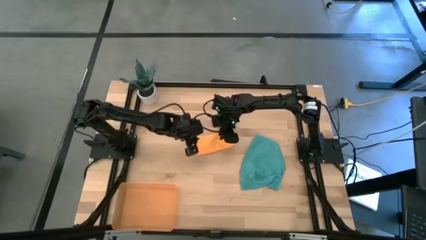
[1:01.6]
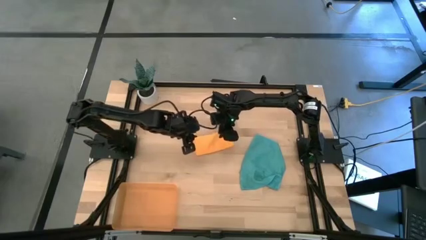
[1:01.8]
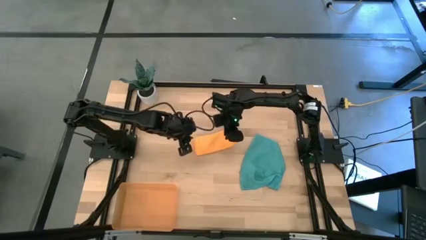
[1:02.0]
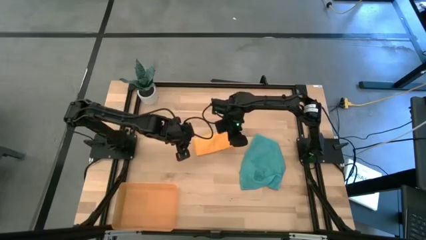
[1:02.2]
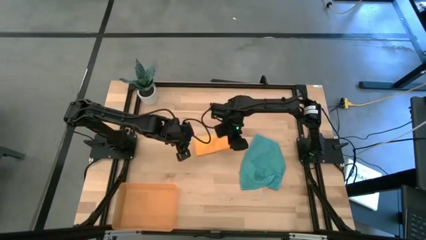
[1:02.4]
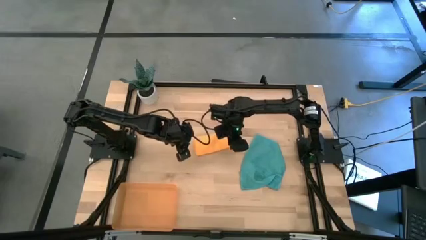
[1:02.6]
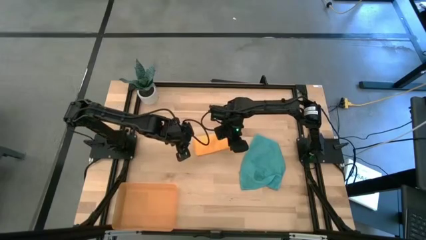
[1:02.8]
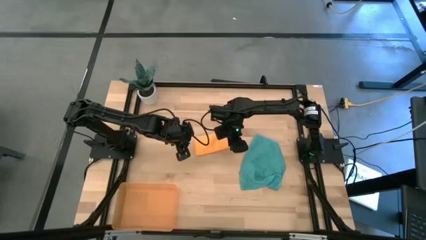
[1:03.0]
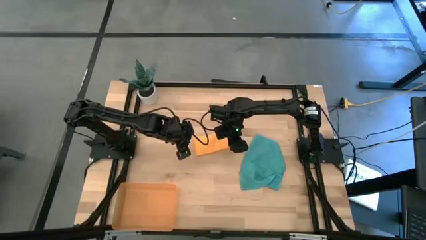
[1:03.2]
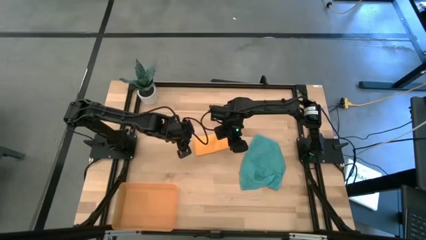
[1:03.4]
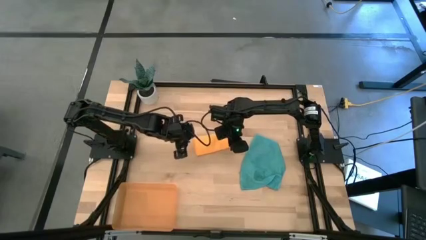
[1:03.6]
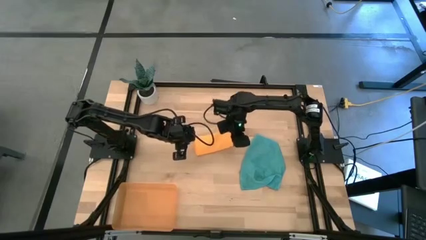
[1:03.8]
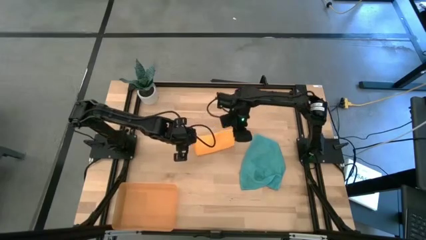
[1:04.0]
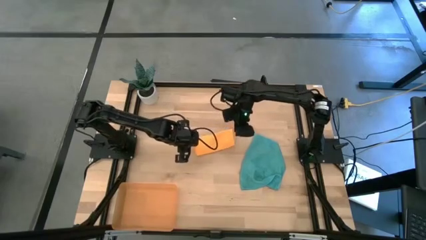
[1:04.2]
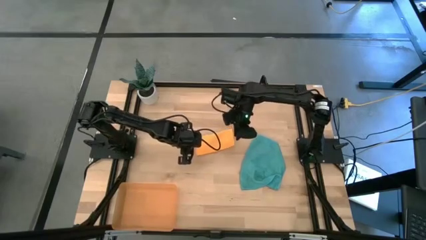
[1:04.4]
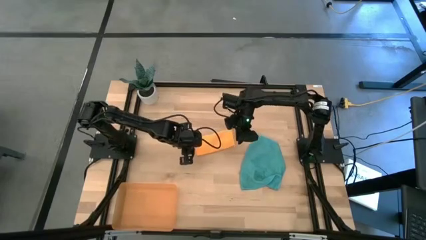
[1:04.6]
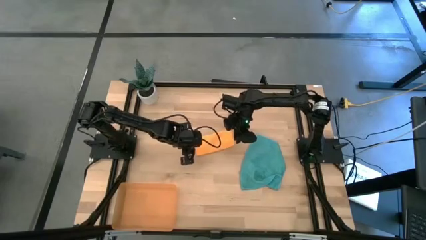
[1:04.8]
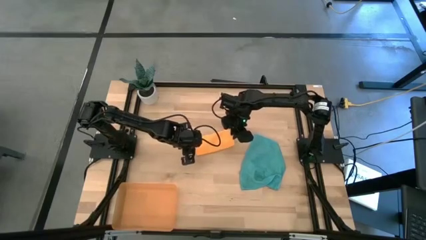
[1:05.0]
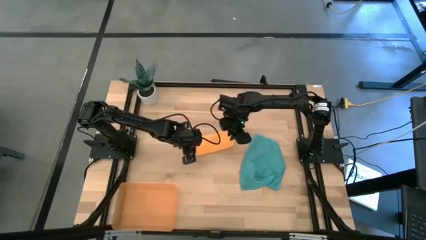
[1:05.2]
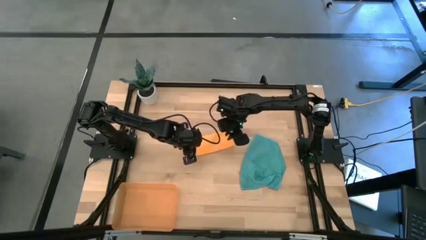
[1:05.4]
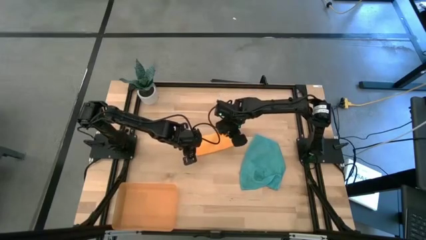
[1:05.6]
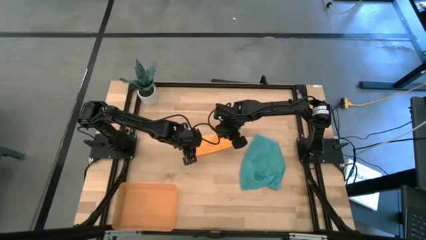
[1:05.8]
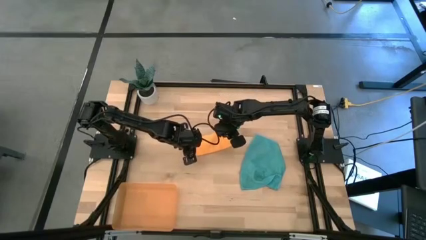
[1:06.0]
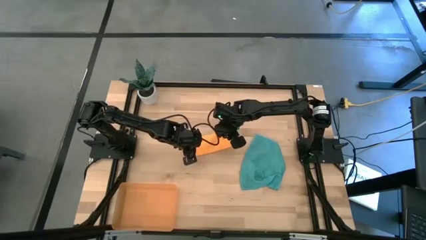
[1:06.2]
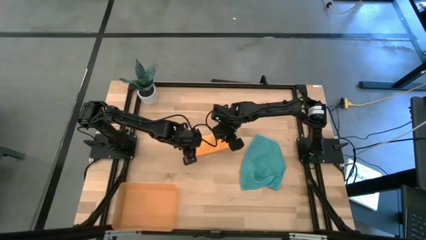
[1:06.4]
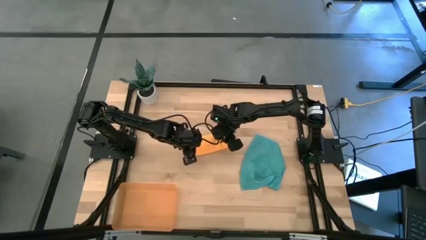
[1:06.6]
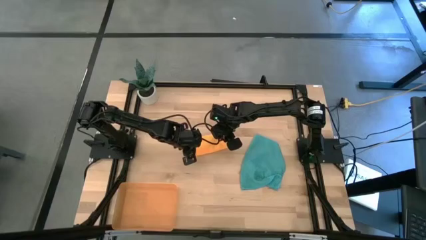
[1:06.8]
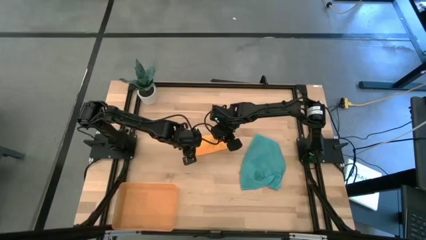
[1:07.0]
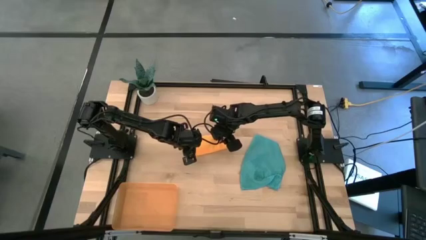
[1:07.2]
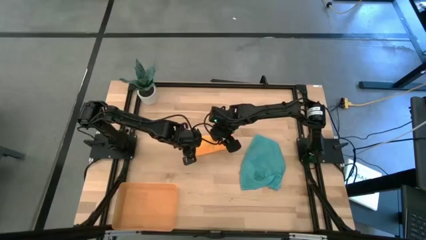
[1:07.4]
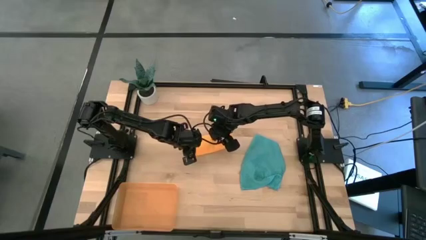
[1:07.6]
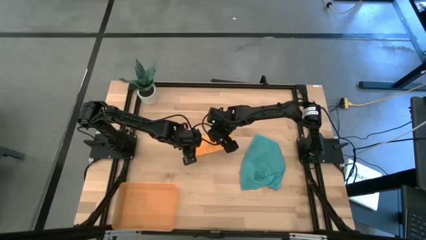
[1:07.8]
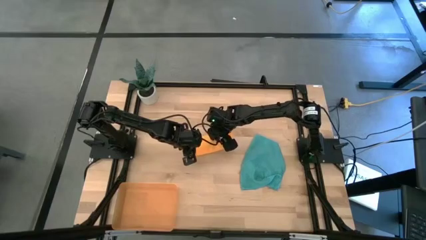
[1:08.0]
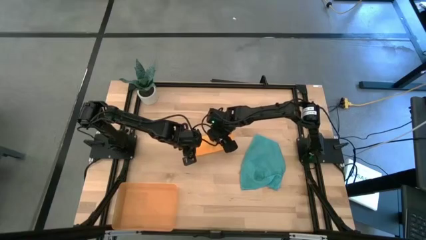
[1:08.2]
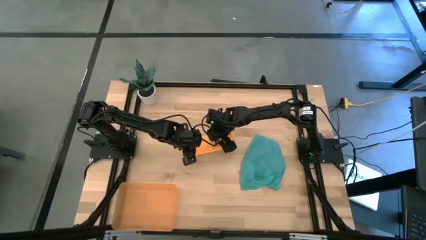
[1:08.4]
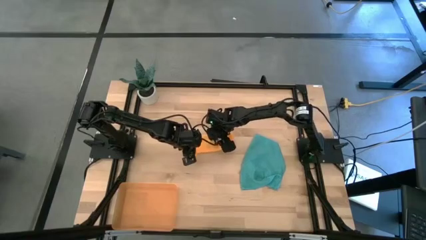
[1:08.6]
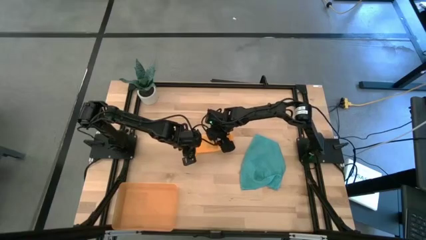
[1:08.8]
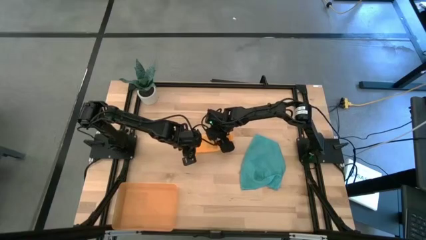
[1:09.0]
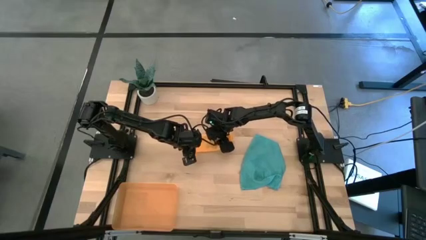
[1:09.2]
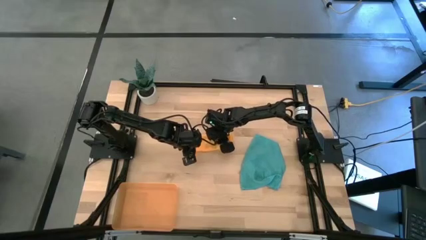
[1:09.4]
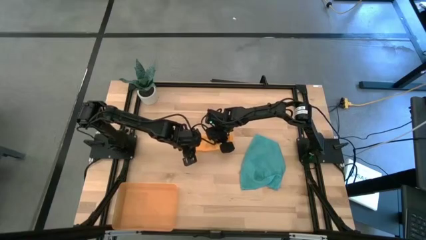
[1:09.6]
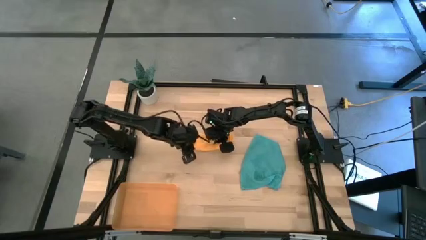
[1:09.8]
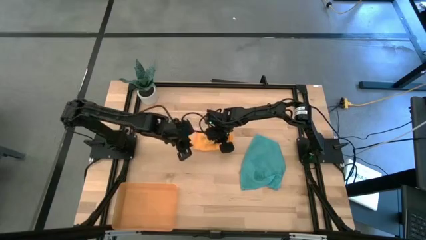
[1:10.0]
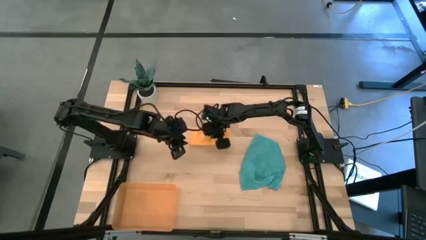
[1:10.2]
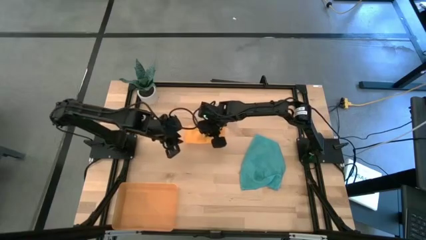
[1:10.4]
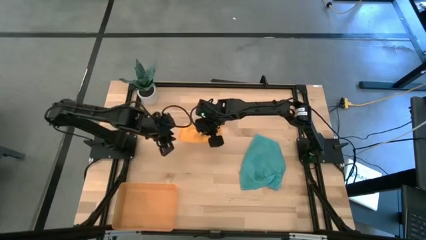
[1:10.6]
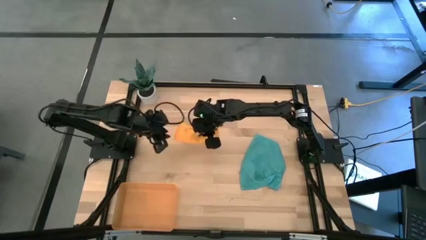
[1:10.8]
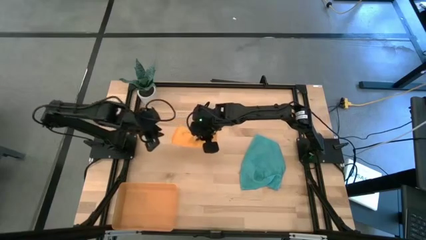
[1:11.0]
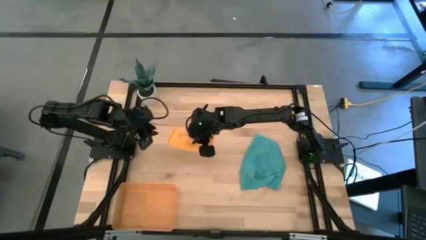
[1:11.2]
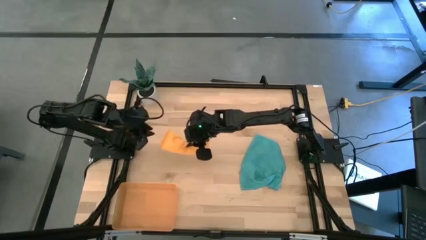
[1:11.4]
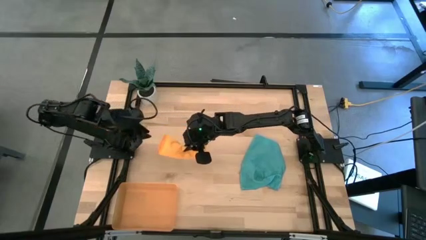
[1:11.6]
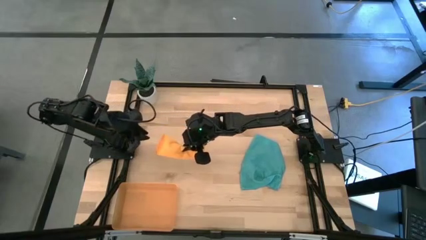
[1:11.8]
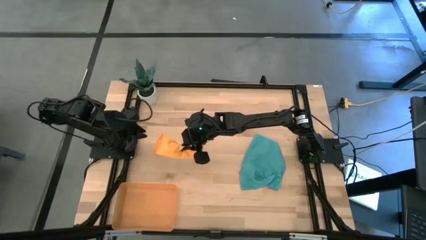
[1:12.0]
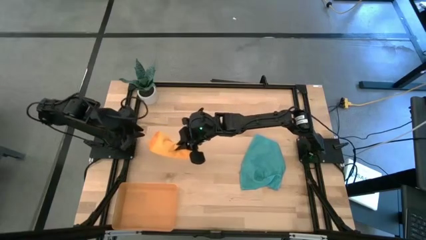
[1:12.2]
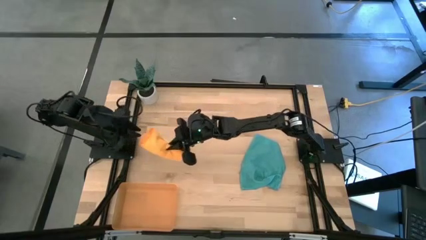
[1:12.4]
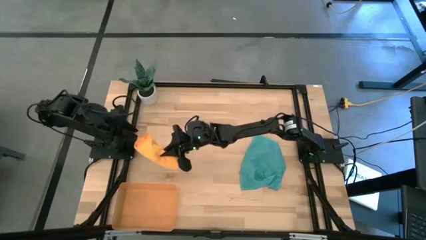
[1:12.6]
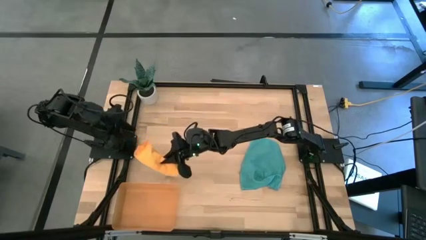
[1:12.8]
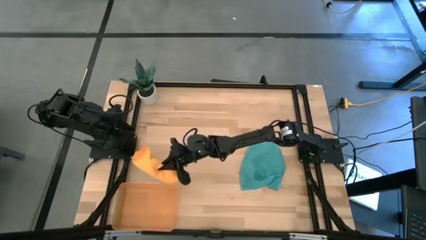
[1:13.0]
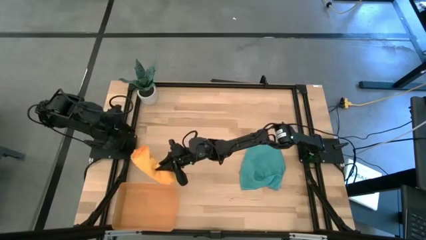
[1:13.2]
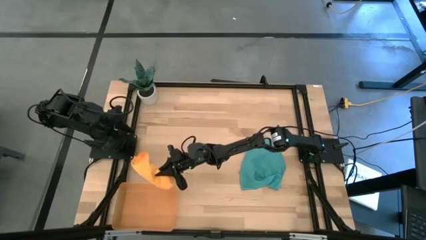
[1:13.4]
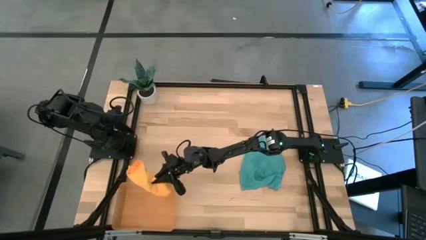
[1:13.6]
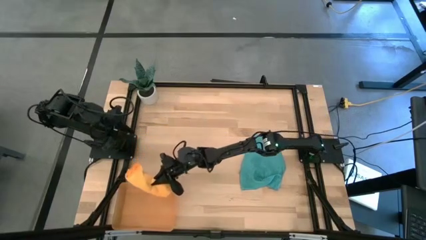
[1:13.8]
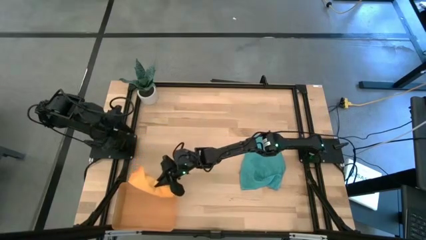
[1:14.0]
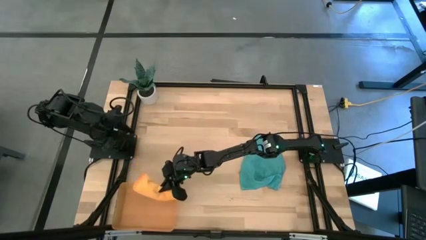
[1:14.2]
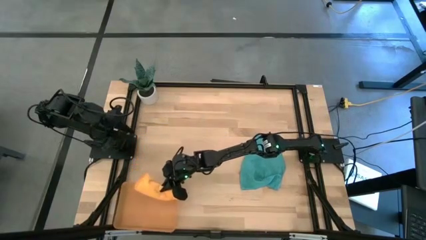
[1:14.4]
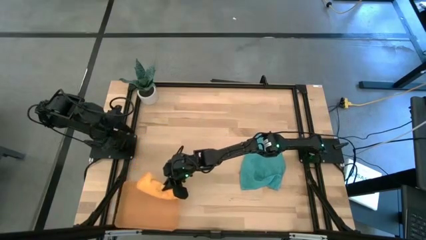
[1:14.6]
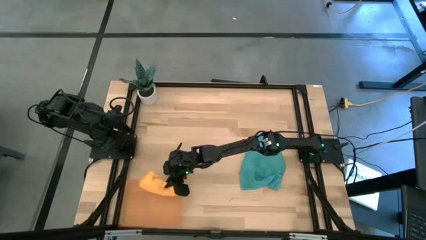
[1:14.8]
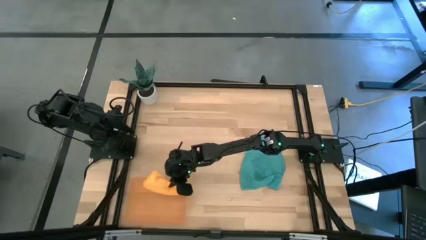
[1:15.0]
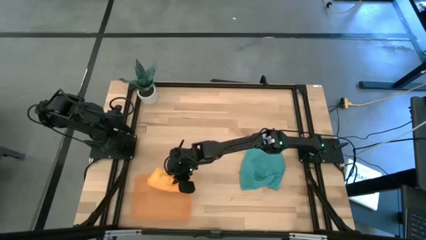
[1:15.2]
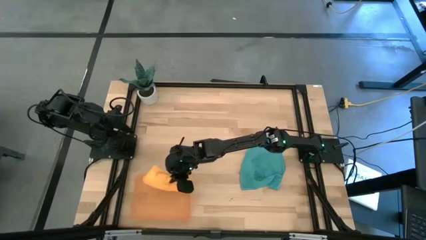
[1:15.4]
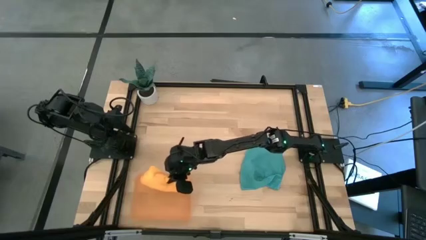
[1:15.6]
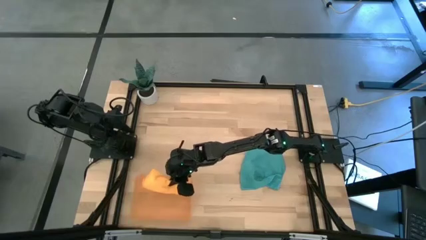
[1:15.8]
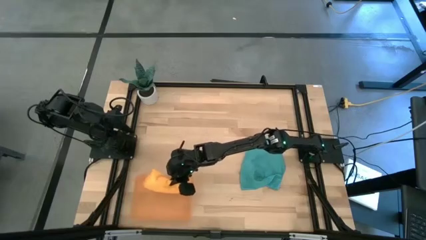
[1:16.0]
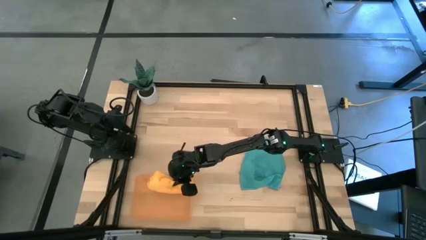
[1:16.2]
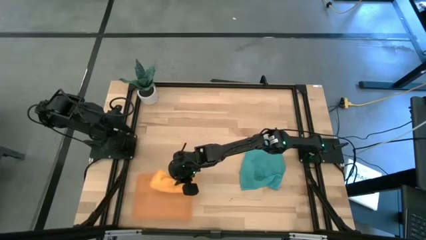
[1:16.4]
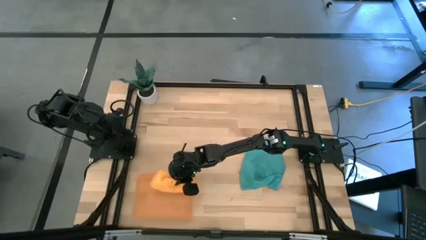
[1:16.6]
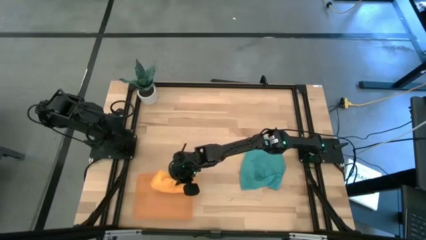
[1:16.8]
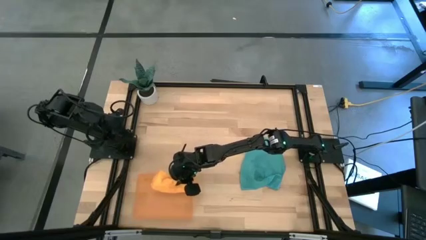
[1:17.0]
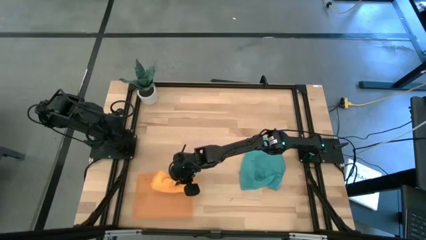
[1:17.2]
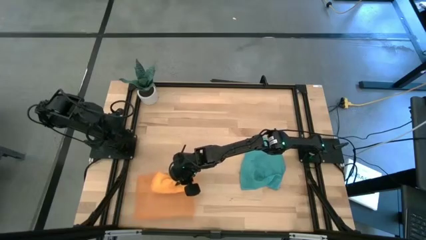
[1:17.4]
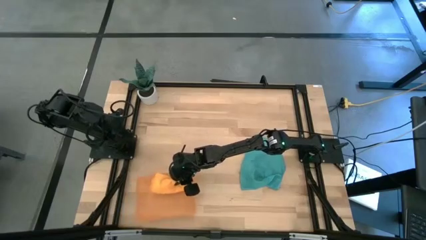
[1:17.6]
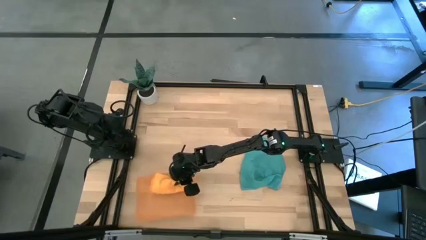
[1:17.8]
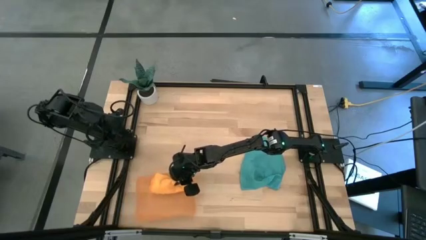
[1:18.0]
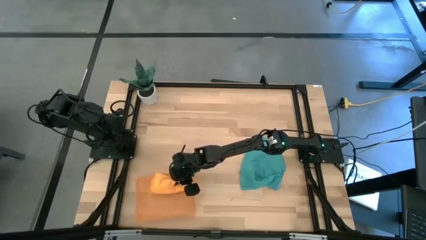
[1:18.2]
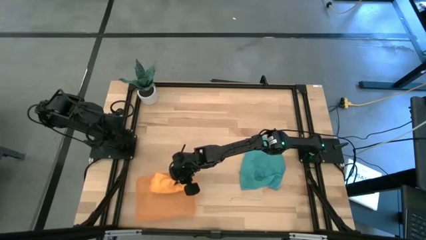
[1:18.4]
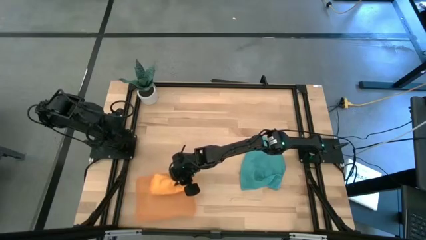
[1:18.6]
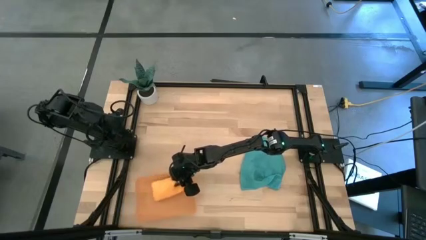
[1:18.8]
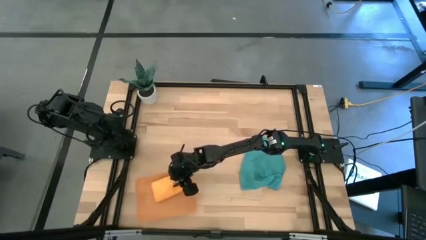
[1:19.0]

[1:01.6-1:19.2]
Task: Roll microfiber towels into tight, uniform cylinder then place into a basket
Put the rolled orange microfiber towel into the bin
